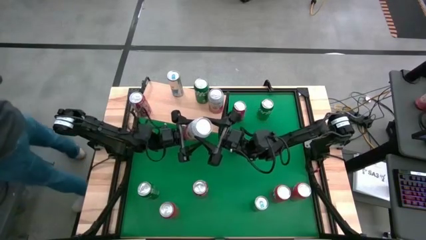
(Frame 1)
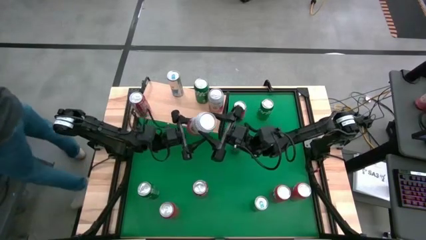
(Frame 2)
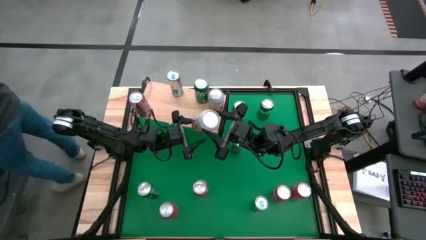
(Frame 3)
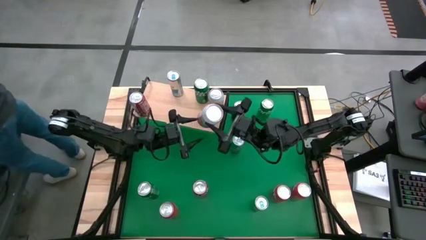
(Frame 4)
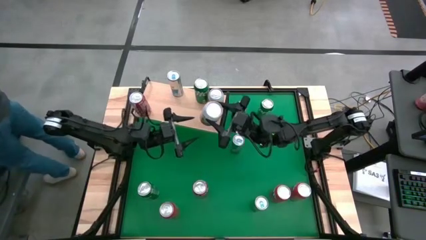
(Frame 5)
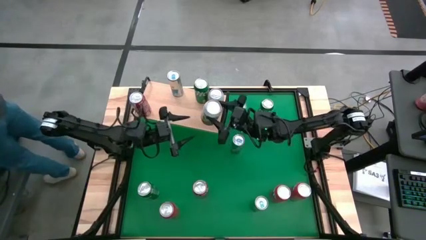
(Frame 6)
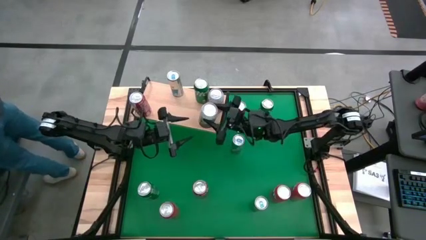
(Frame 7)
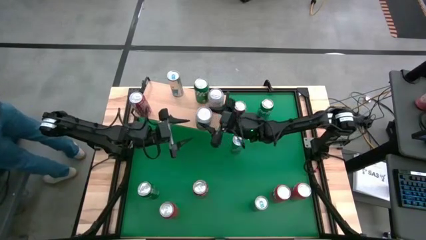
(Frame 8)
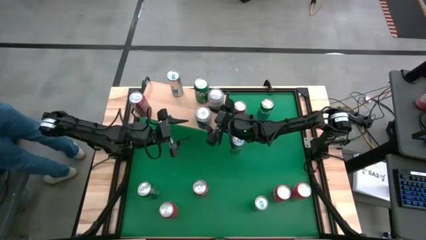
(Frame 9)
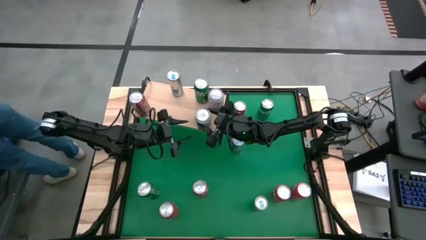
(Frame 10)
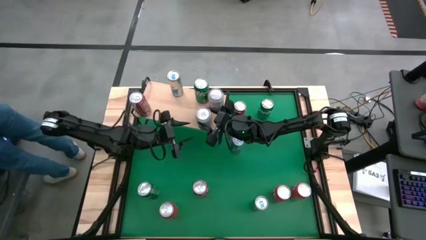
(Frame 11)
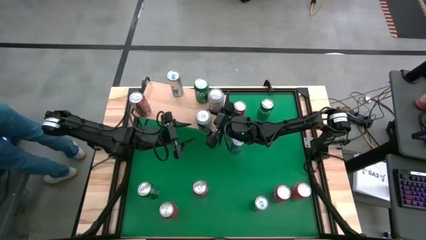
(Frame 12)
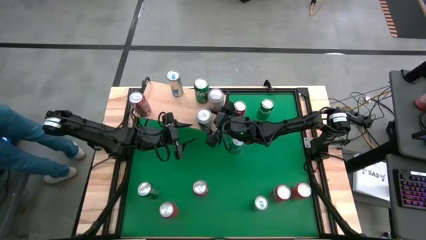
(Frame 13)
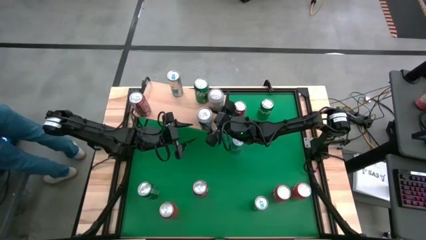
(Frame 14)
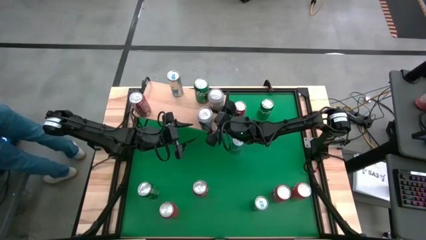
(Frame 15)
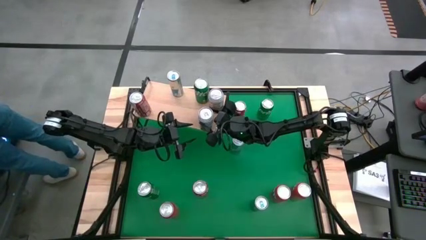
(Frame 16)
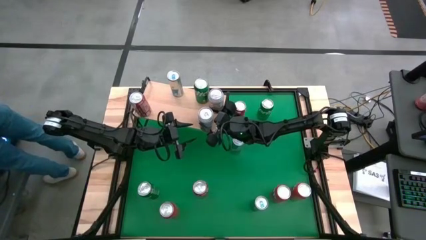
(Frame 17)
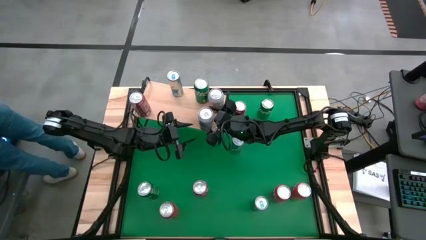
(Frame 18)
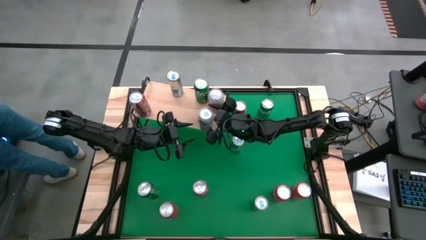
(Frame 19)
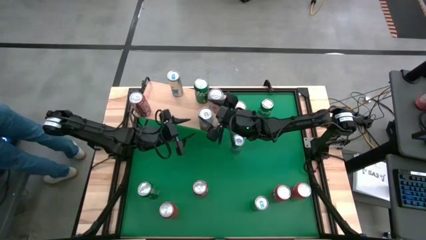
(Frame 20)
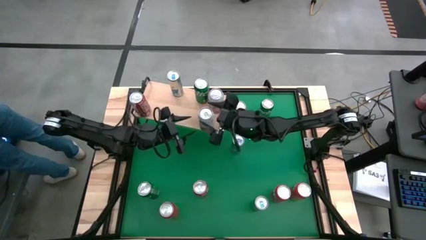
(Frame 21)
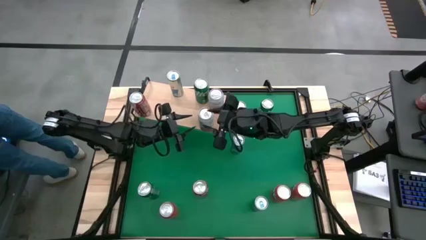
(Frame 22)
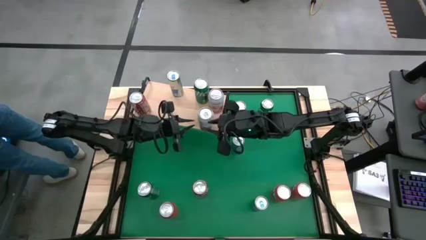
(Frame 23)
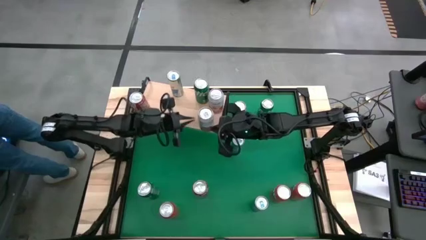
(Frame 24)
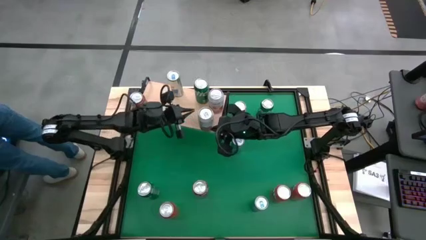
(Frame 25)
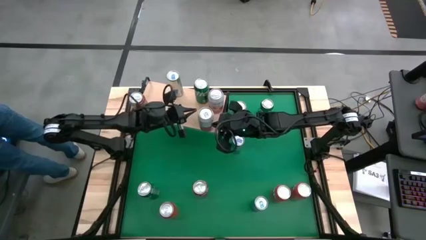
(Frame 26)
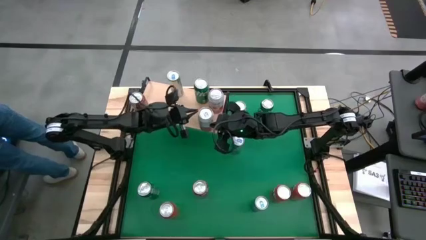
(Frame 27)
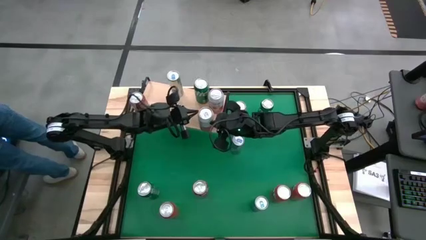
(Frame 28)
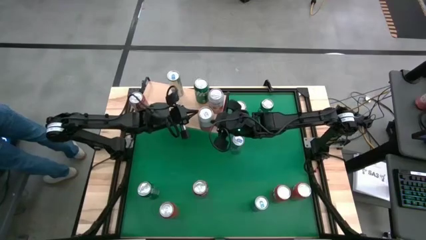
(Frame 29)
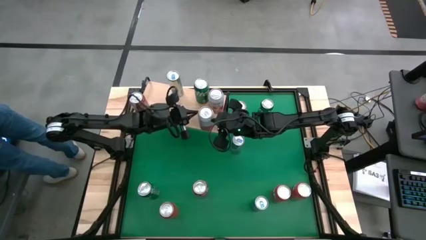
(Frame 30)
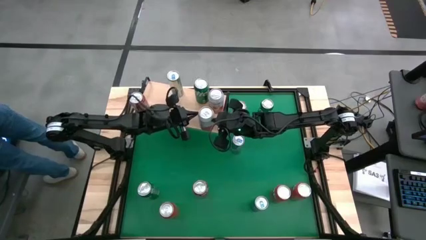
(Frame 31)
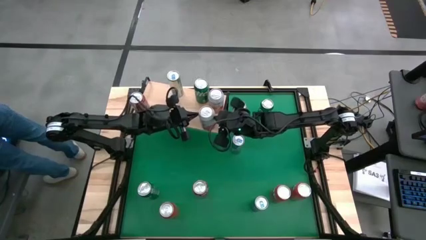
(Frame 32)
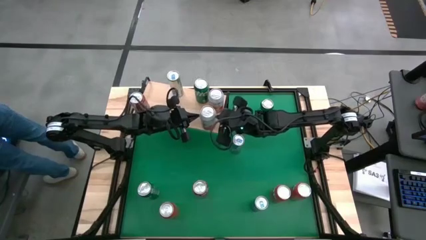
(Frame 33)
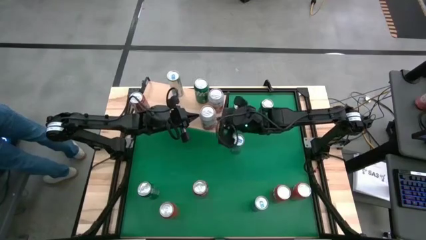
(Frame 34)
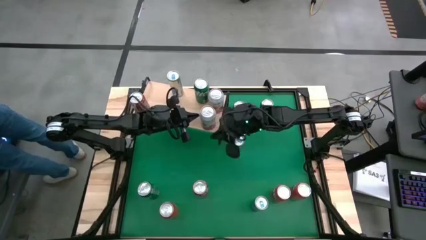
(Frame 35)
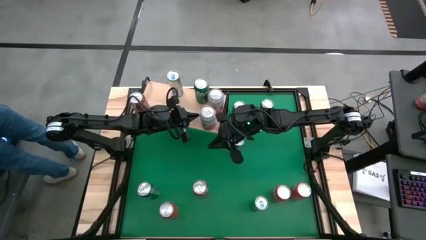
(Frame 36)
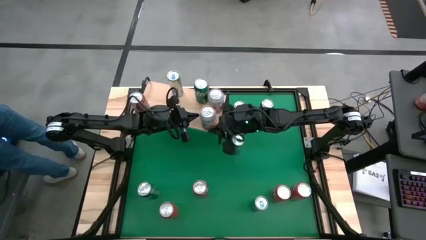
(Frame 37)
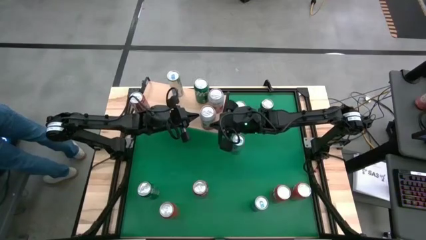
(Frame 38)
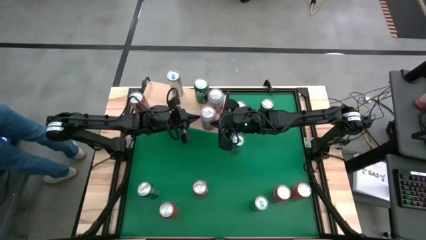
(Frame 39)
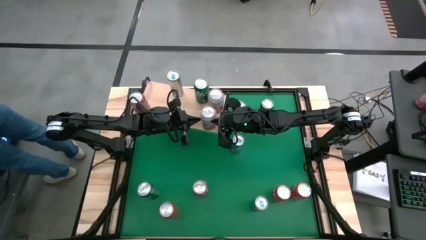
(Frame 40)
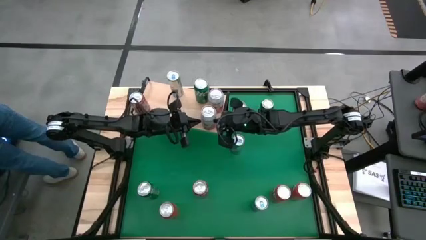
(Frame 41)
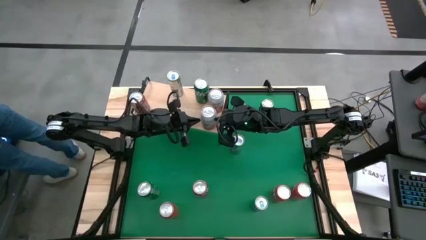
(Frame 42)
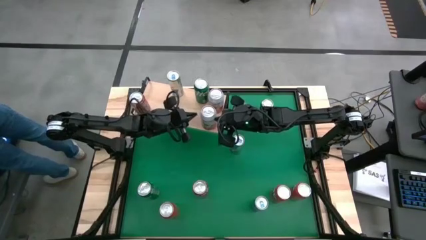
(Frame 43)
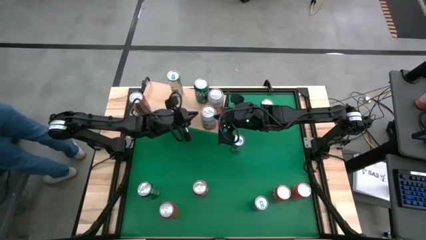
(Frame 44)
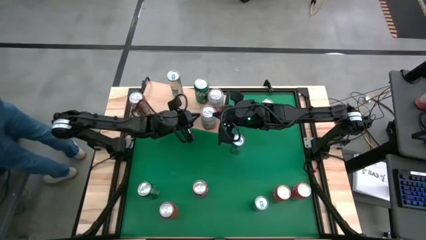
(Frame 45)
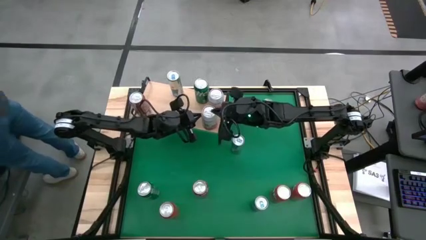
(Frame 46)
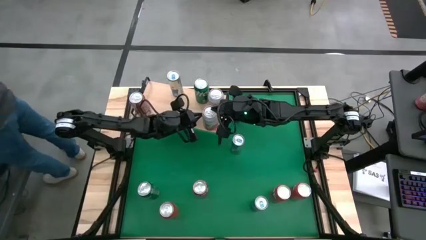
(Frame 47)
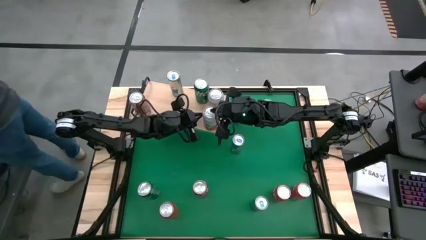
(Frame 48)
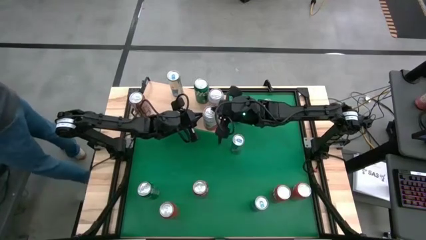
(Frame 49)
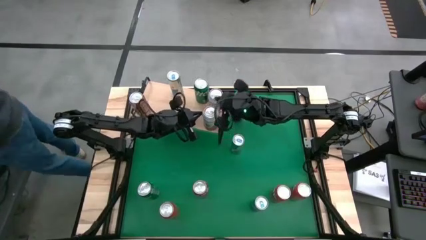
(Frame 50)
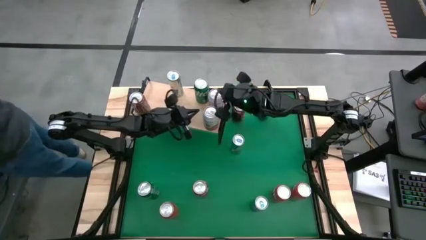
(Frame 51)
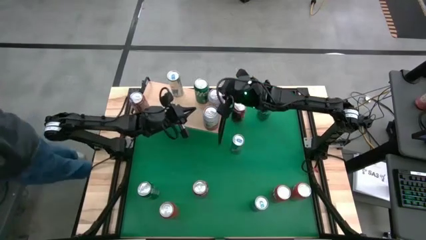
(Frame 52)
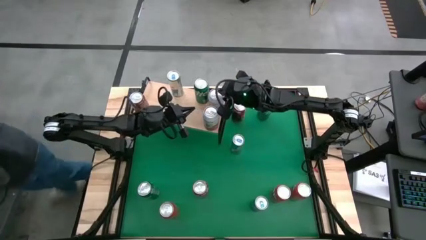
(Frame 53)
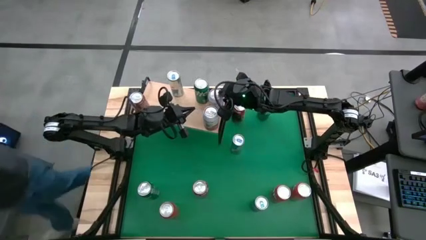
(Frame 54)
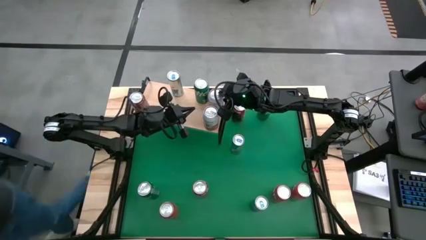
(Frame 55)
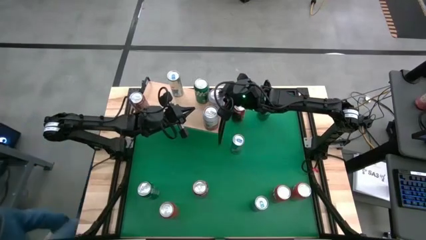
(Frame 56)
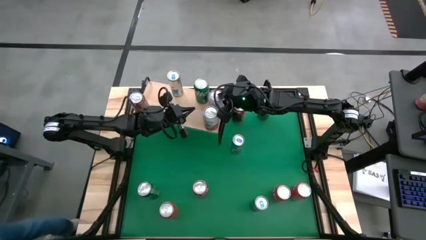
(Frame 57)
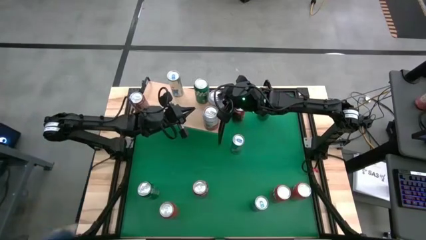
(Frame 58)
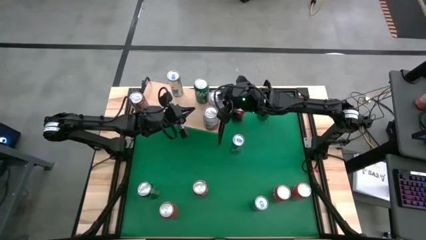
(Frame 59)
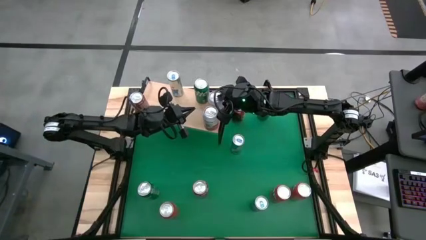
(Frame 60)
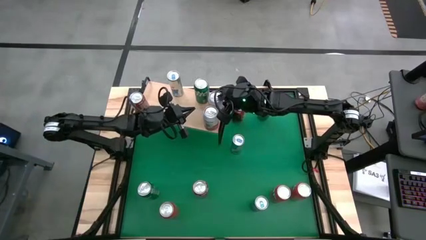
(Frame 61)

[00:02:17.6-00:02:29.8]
Task: Place canned beverage on shelf
Put the pink/white soda can on the shelf aligned with the other pink/white soda can

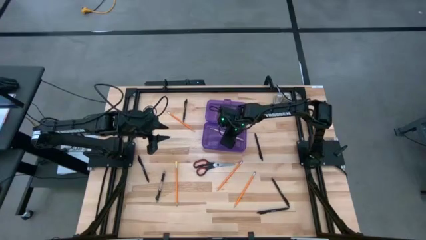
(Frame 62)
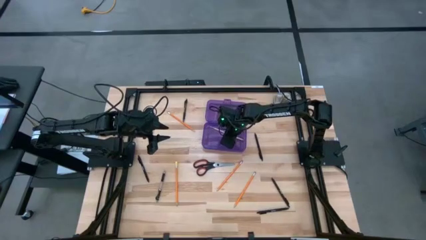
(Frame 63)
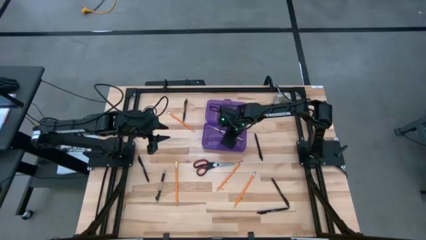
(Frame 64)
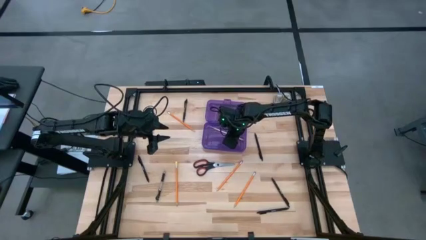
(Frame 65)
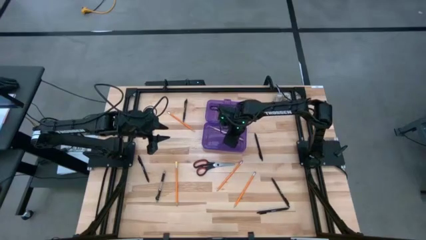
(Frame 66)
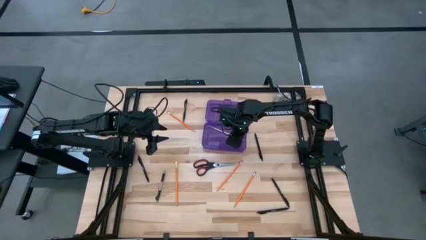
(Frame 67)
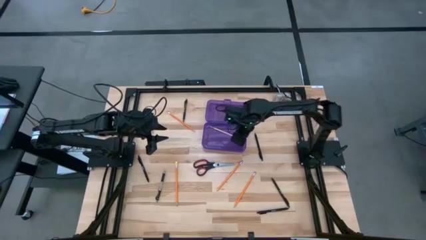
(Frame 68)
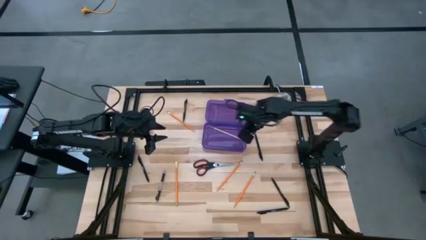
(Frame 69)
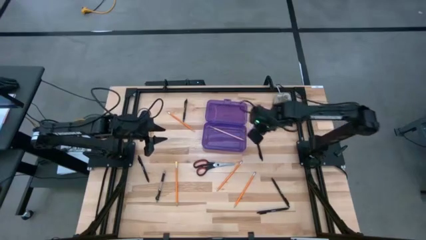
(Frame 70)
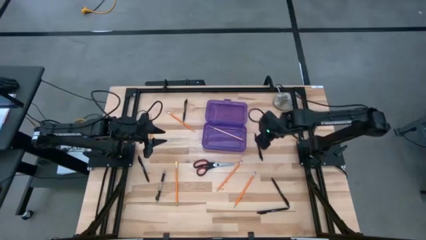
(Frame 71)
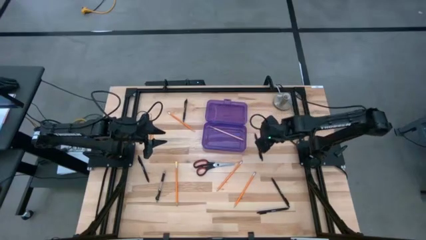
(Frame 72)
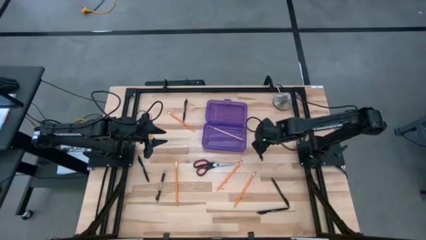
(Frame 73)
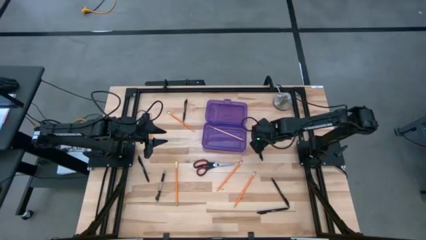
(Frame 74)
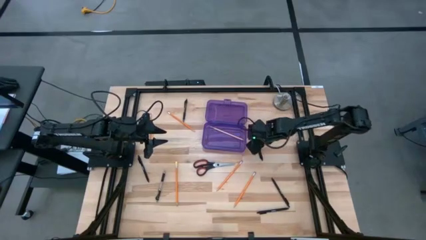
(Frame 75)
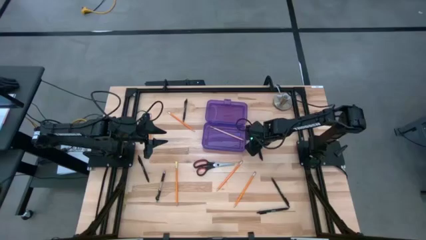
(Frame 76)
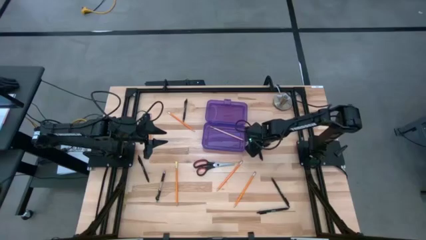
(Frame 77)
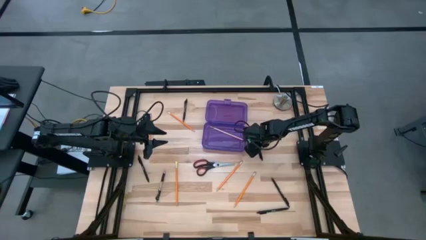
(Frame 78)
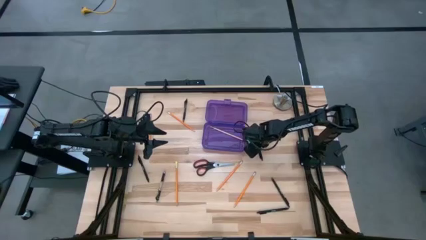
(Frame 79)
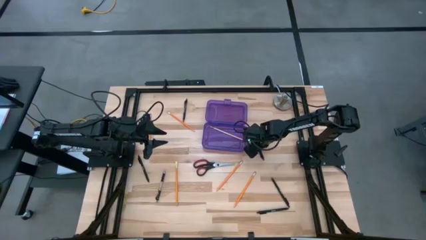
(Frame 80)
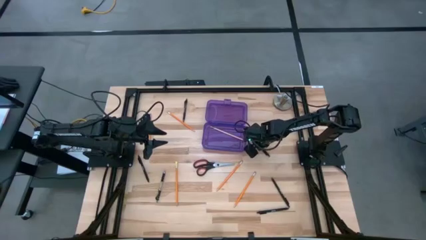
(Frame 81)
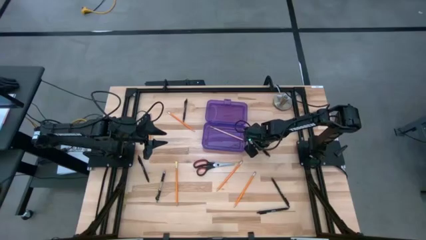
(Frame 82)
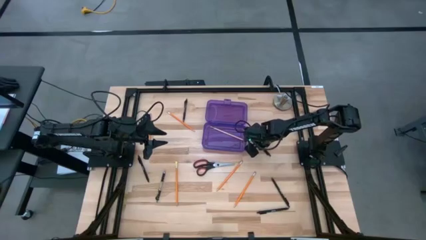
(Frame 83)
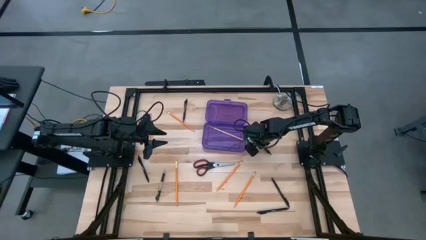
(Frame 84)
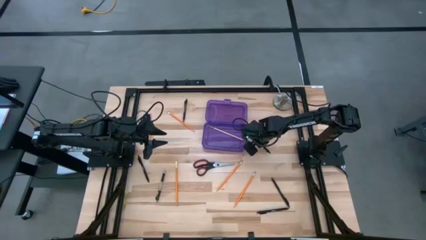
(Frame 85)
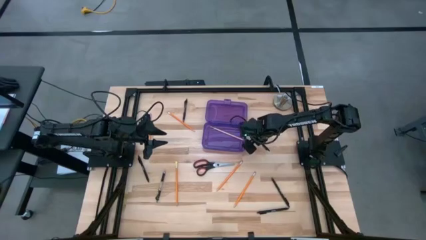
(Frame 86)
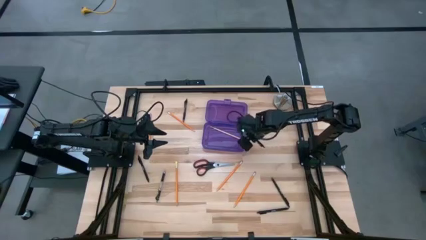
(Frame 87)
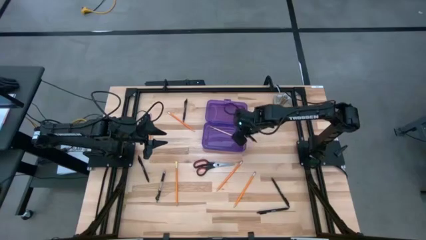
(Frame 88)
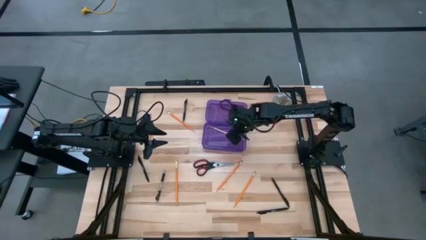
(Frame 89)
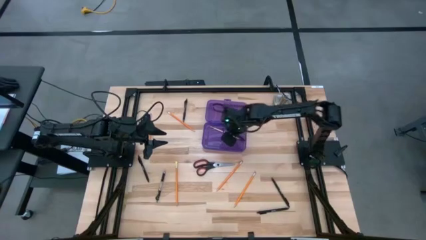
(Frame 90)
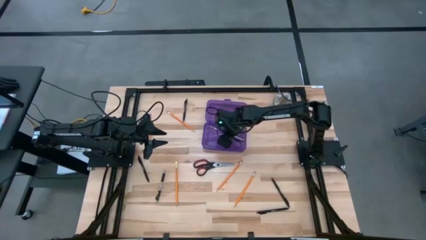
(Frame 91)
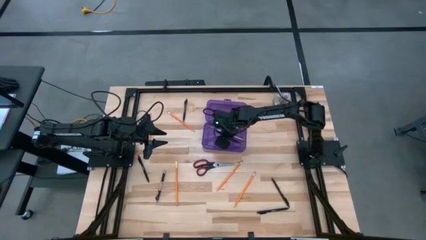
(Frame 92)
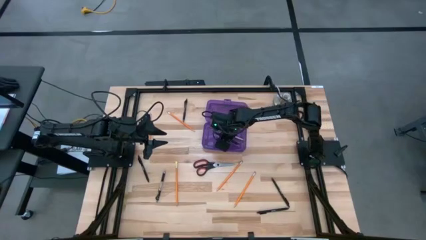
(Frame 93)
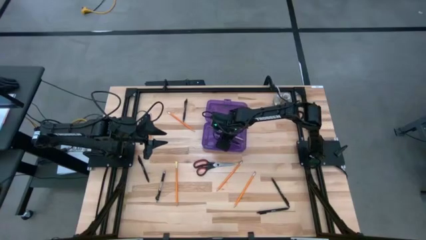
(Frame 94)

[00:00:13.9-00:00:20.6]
Task: Pick & place school supplies into a supply box
Put the black pen into the pencil box
